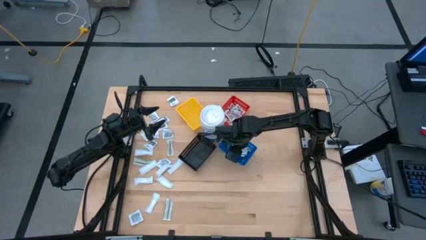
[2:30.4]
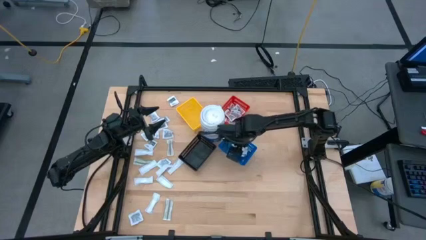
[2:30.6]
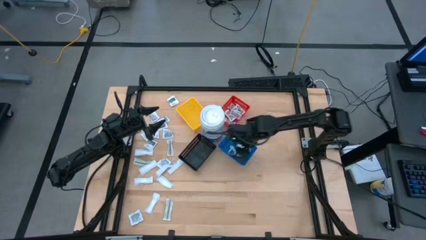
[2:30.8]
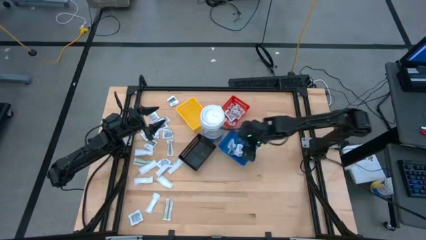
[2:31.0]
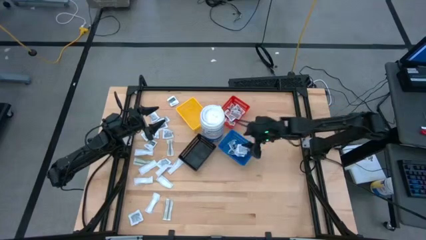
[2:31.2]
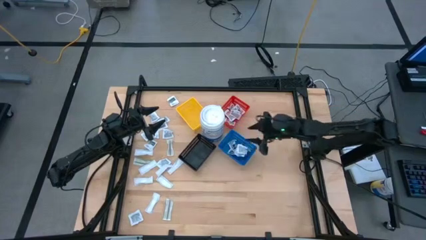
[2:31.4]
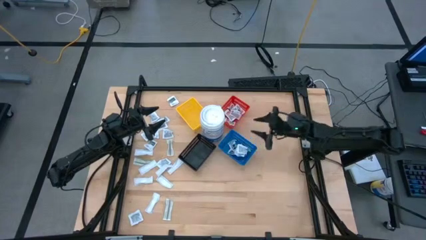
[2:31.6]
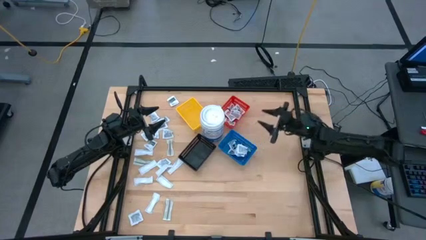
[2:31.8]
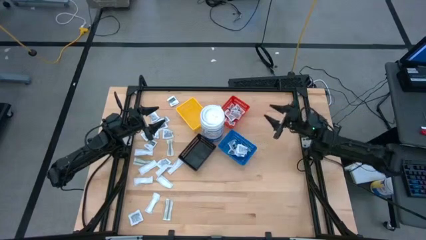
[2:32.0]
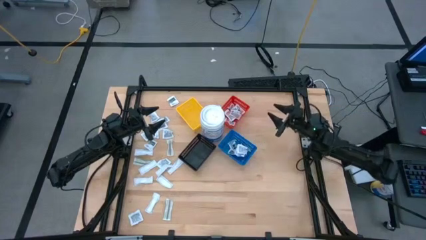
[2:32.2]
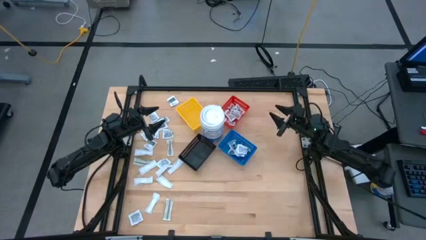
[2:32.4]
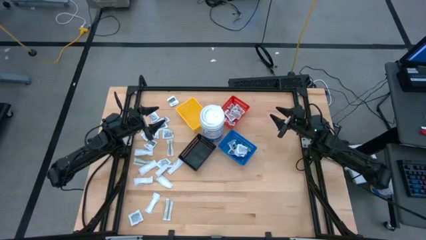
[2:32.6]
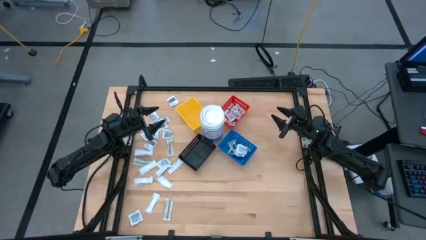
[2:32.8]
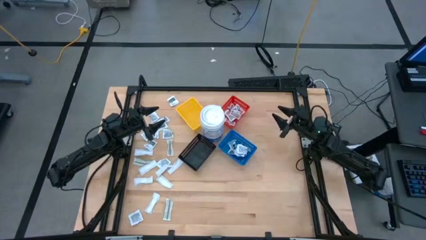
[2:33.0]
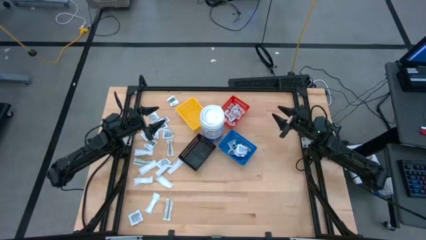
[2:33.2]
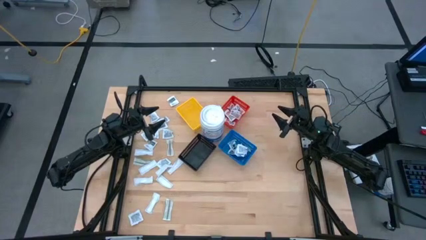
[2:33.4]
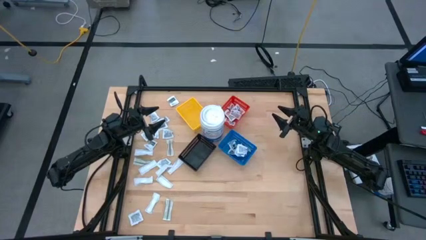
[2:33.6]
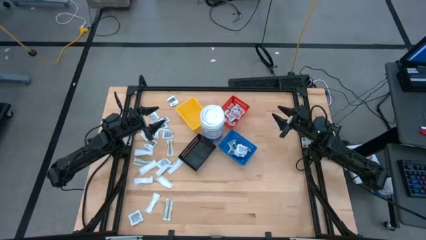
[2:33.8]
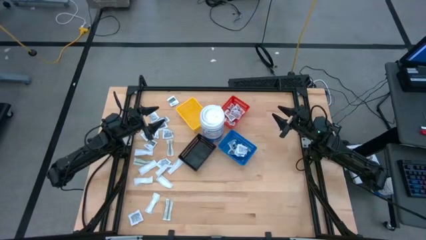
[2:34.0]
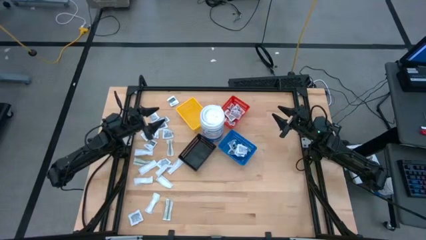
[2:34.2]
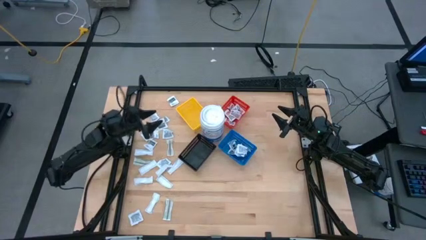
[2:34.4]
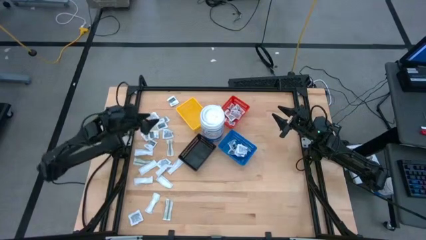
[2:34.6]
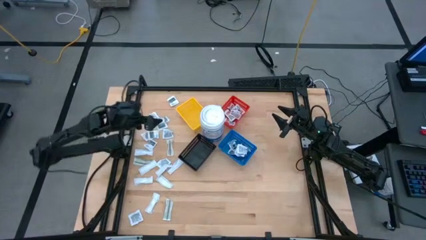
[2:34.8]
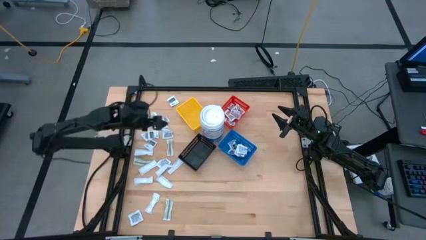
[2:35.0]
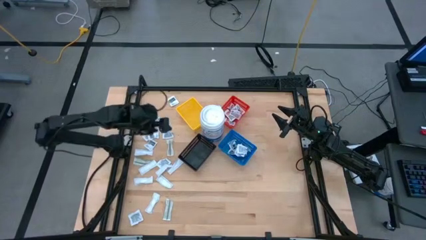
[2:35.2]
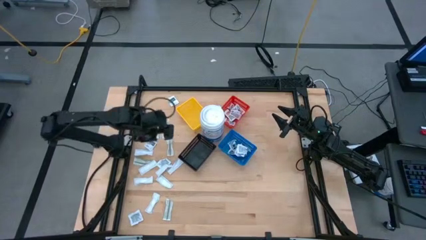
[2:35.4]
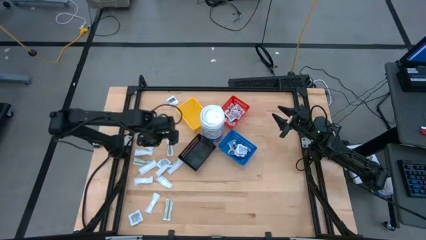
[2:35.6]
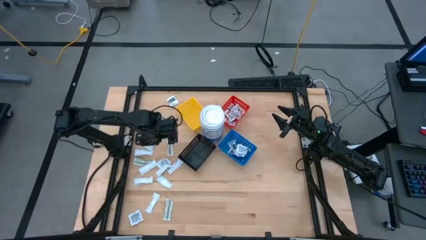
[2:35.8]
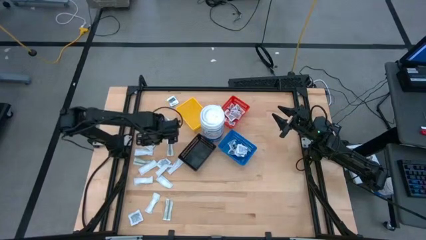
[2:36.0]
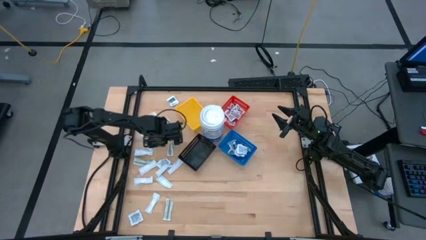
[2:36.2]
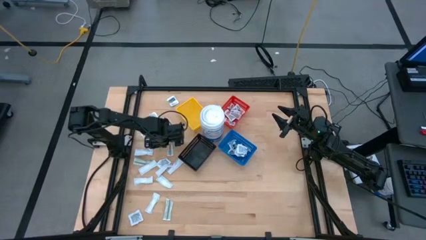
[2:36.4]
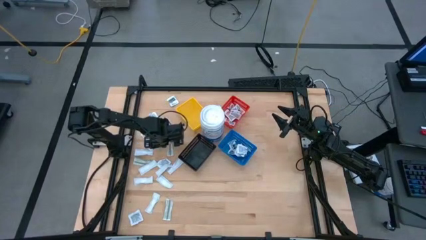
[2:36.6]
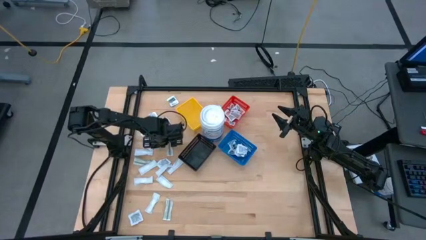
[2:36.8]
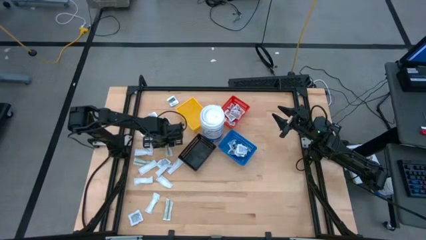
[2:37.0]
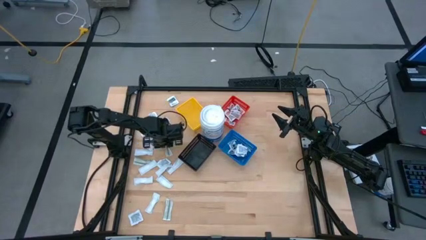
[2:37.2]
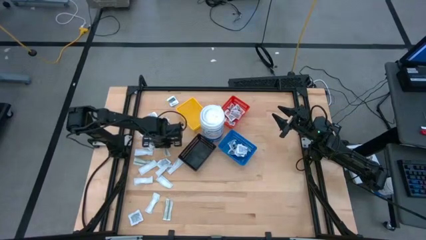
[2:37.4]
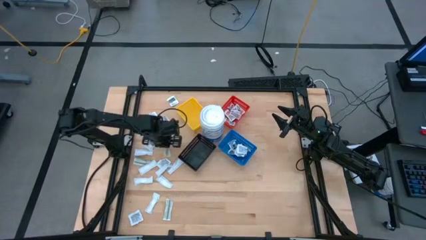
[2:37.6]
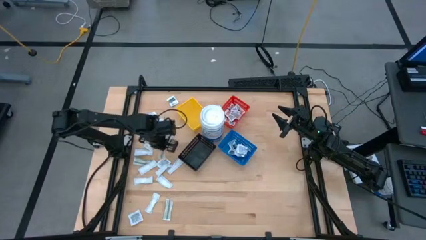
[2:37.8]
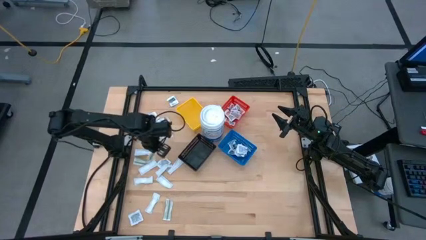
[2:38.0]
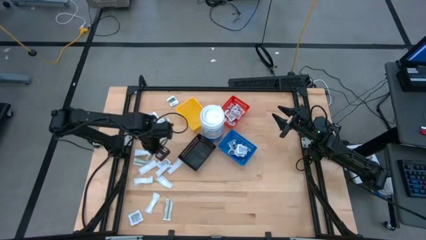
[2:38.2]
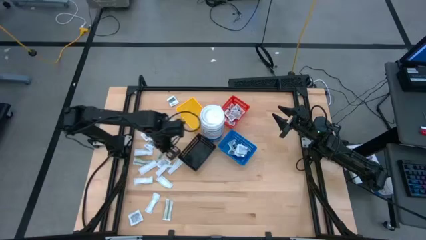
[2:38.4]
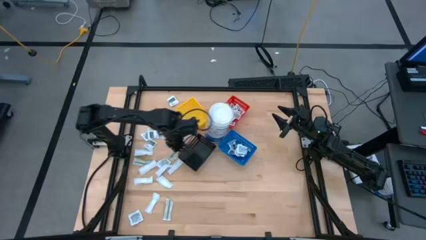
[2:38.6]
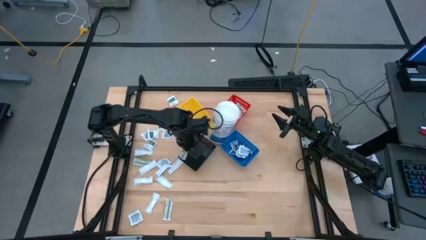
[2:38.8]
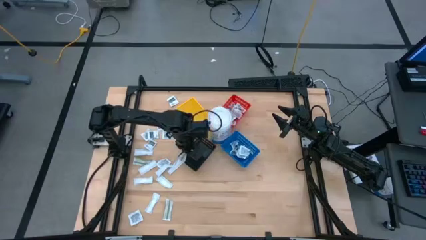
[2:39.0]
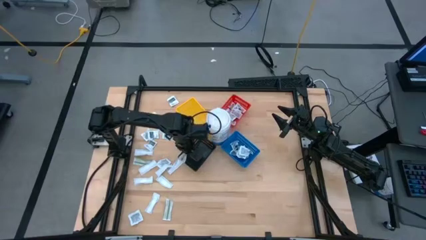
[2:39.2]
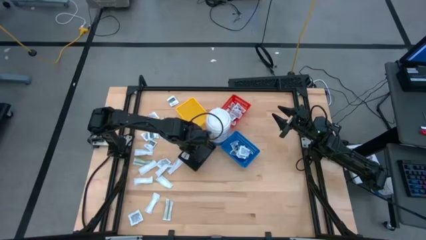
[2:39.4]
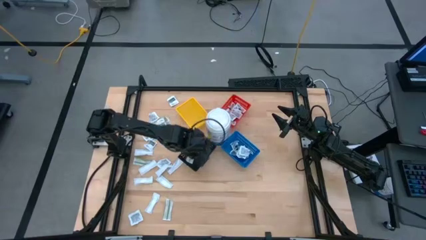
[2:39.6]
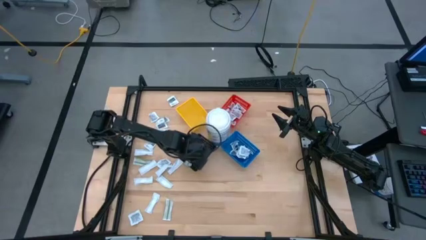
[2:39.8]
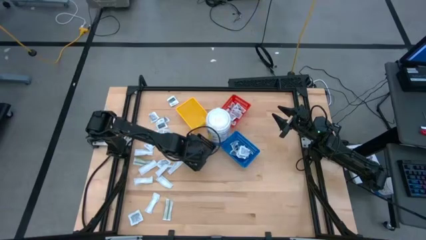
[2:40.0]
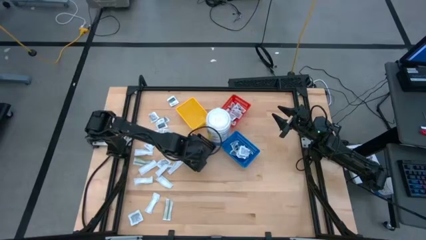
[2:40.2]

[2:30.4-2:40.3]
Task: Pick & Place First Aid Supplies
Put the bandage pack into the black bin

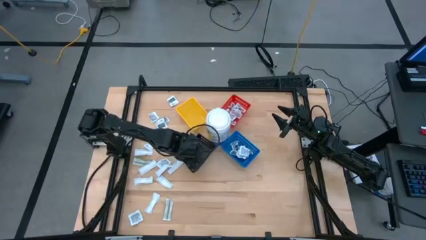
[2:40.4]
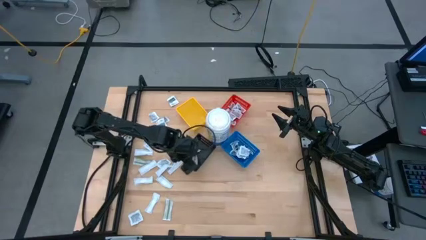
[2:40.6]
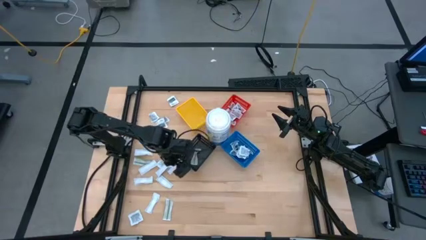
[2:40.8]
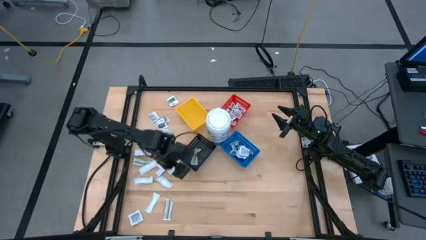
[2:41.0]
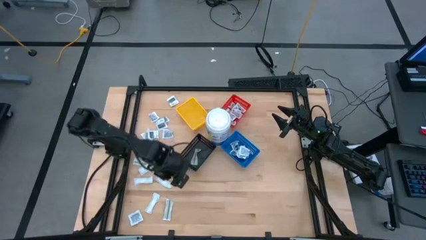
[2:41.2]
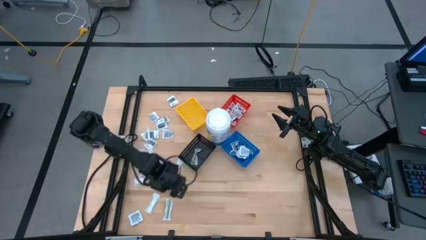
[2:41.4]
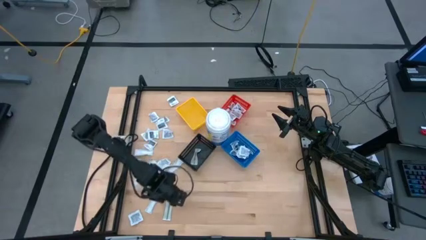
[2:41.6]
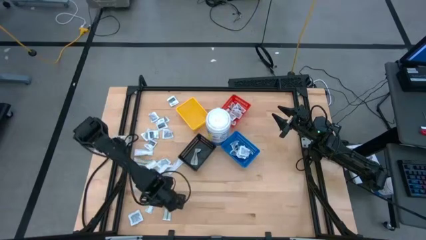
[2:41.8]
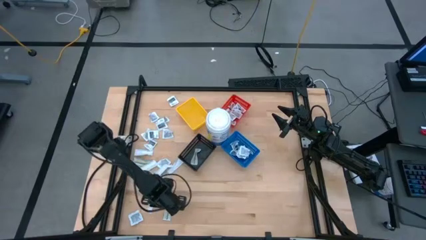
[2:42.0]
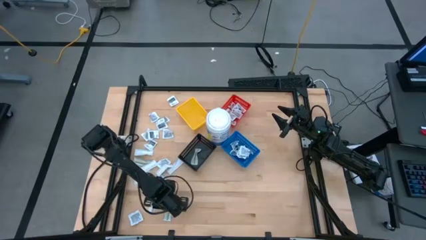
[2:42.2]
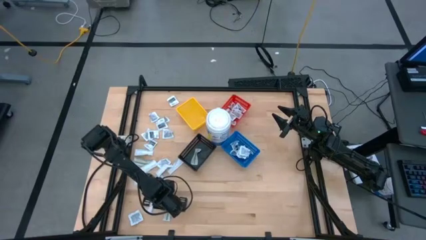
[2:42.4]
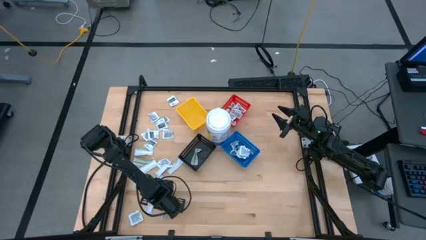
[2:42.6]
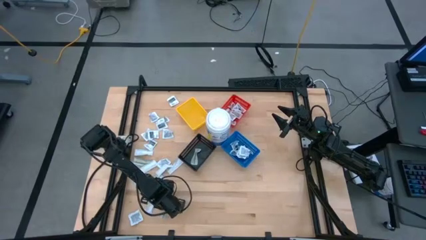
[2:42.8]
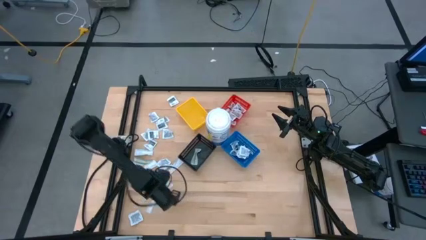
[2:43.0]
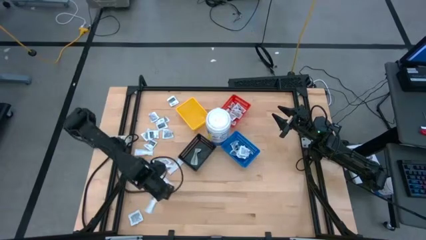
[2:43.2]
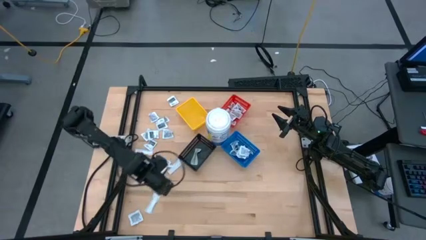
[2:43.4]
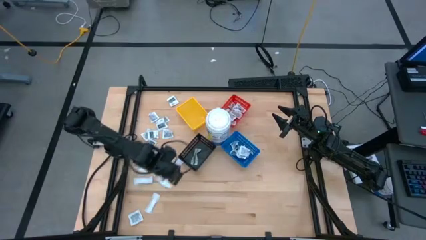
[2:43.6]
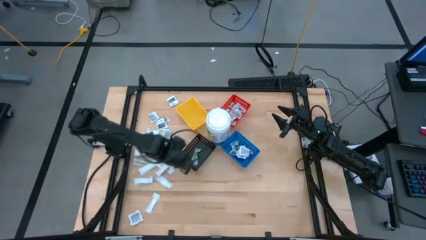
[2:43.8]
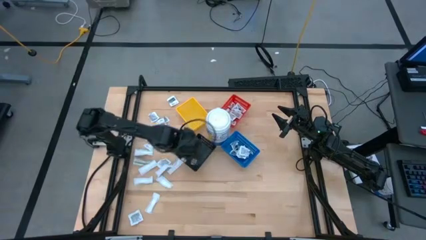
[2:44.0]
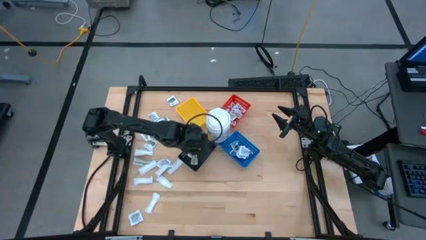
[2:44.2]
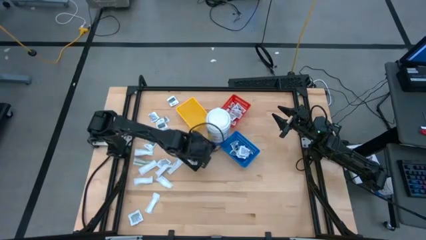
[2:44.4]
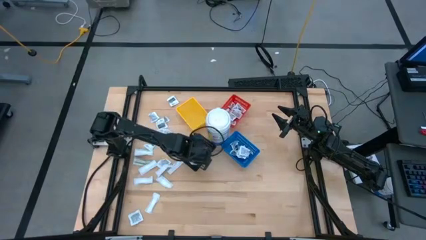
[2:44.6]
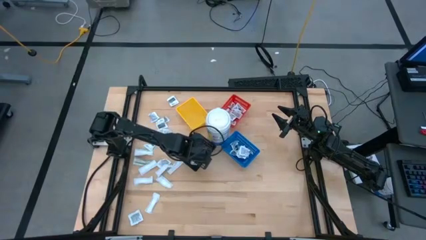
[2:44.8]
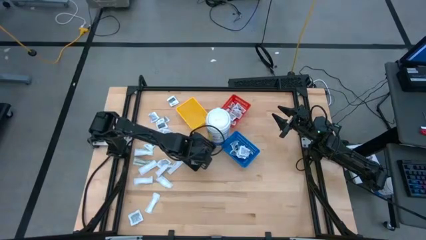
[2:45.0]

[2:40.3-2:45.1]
Put the bandage pack into the black bin
